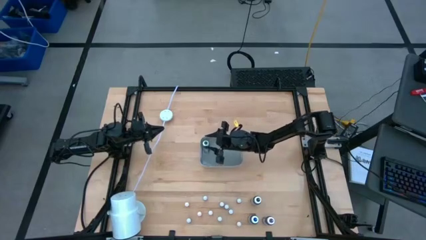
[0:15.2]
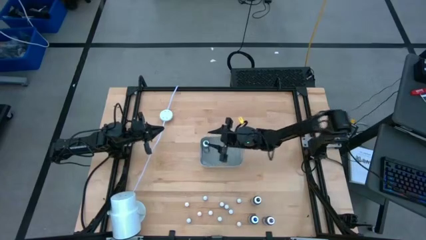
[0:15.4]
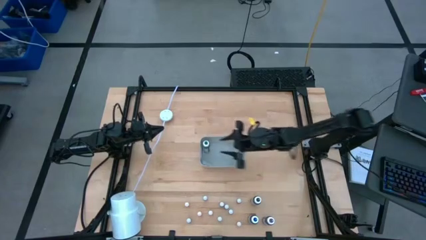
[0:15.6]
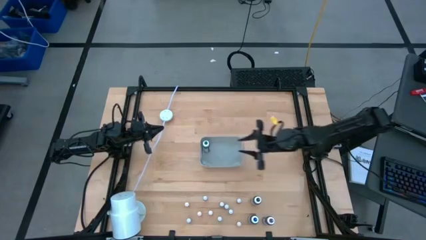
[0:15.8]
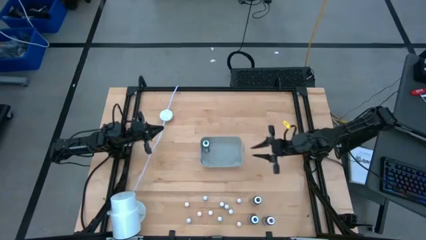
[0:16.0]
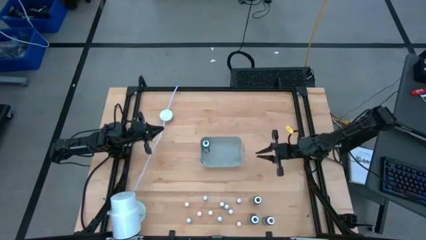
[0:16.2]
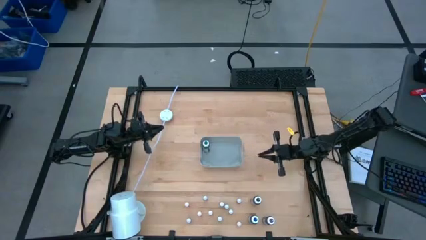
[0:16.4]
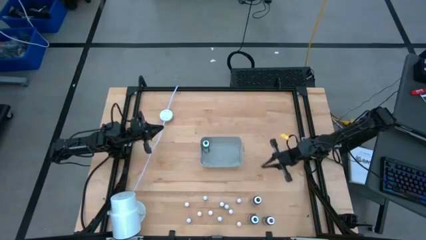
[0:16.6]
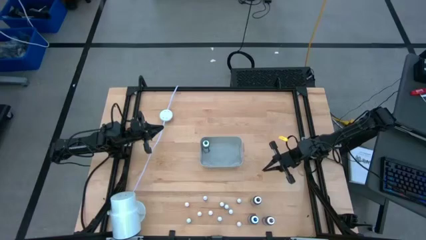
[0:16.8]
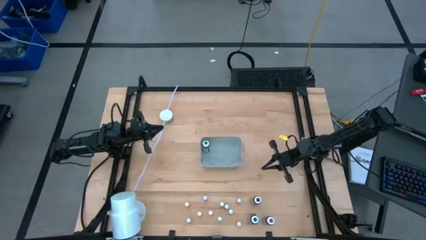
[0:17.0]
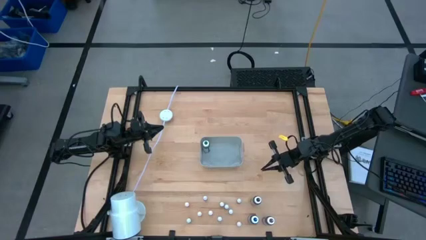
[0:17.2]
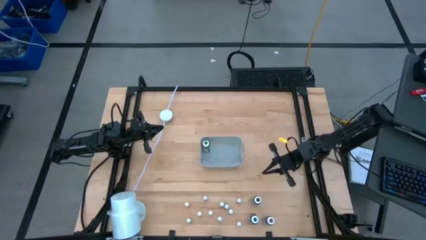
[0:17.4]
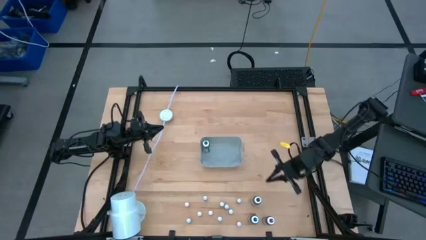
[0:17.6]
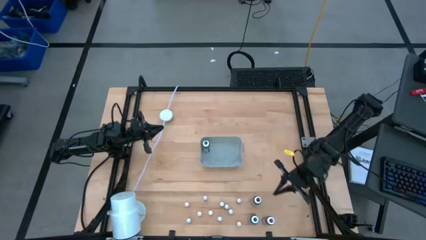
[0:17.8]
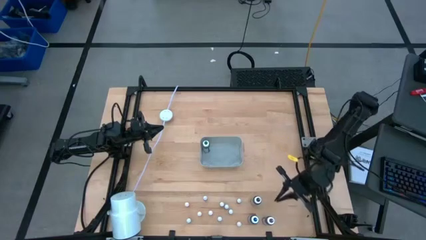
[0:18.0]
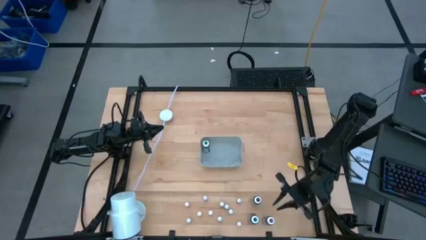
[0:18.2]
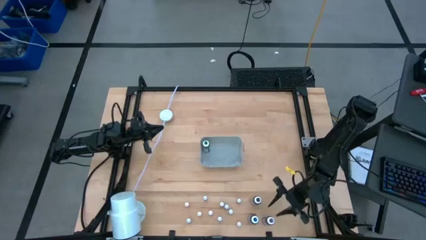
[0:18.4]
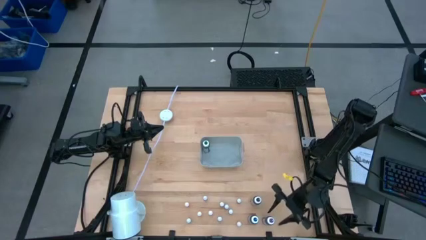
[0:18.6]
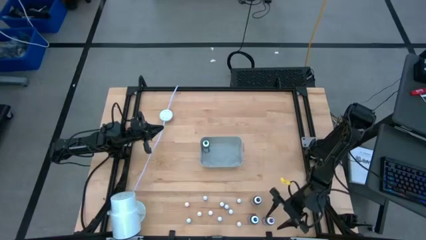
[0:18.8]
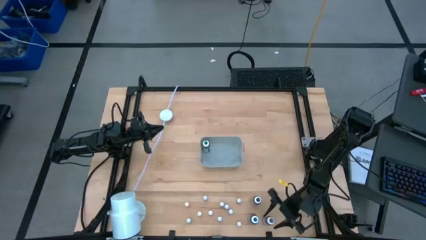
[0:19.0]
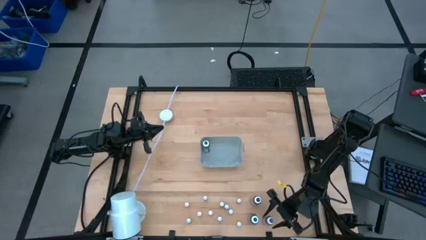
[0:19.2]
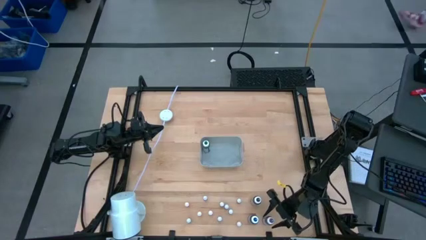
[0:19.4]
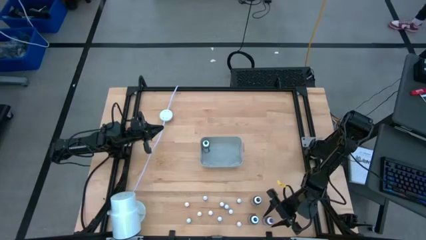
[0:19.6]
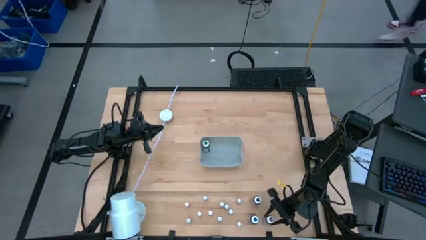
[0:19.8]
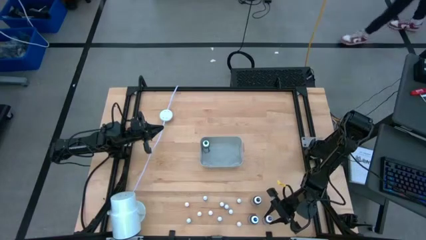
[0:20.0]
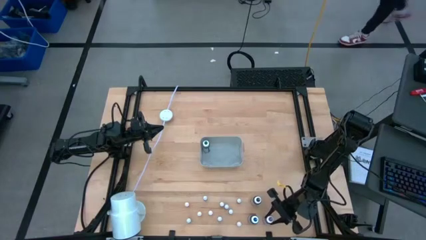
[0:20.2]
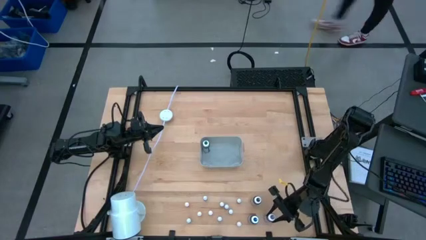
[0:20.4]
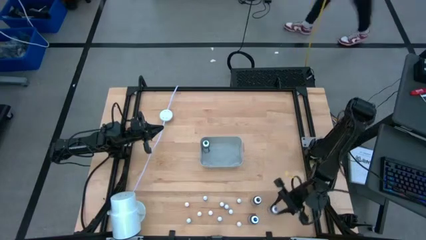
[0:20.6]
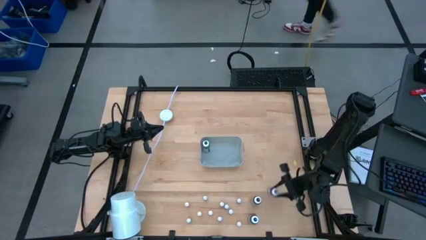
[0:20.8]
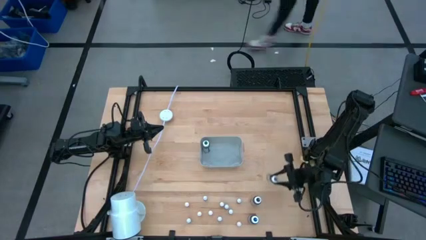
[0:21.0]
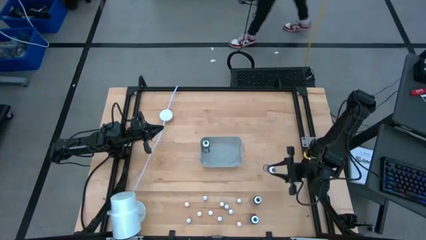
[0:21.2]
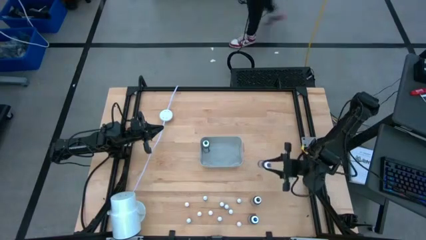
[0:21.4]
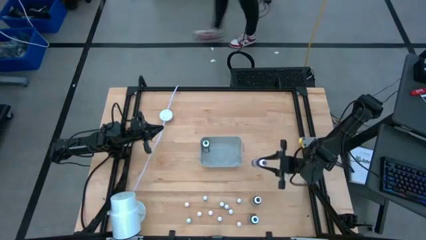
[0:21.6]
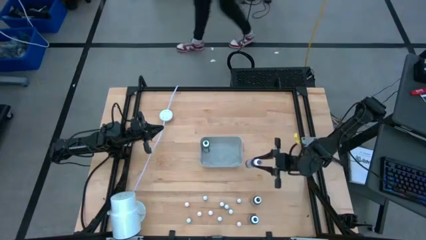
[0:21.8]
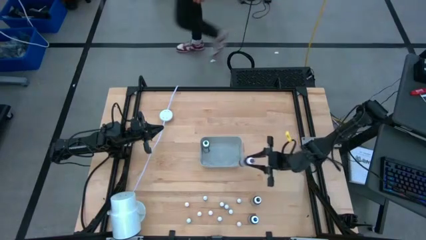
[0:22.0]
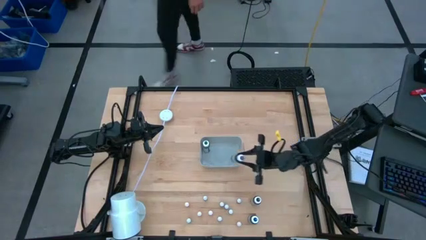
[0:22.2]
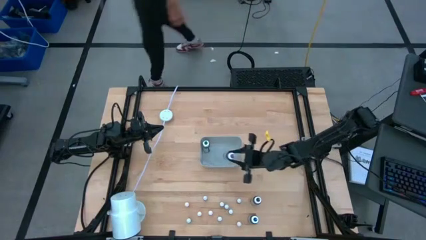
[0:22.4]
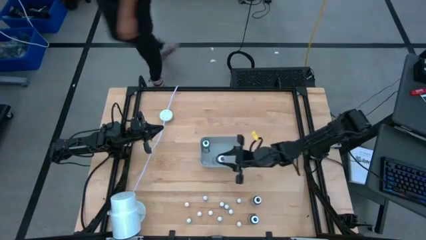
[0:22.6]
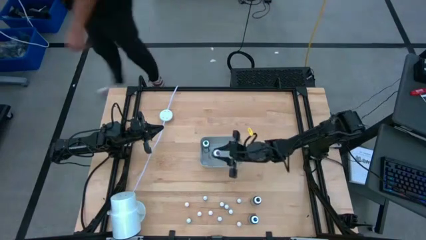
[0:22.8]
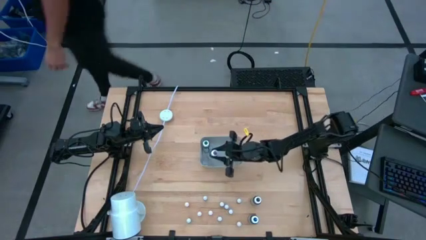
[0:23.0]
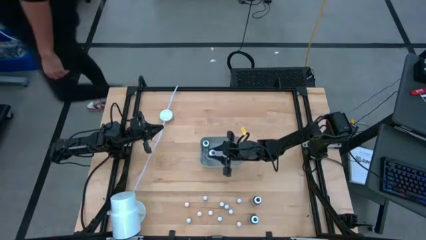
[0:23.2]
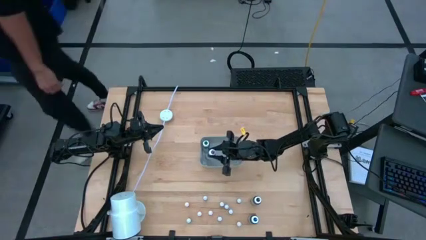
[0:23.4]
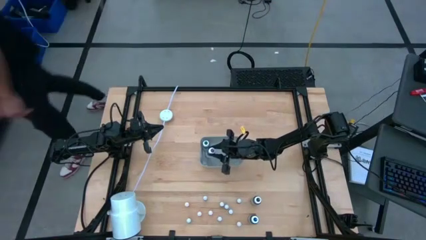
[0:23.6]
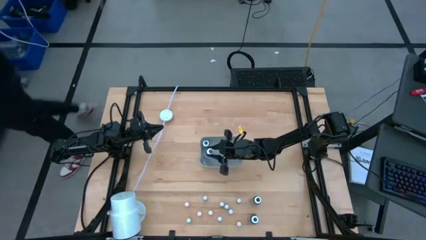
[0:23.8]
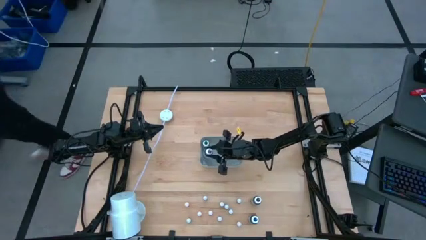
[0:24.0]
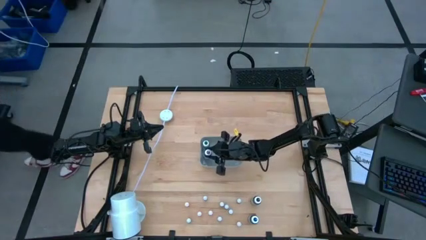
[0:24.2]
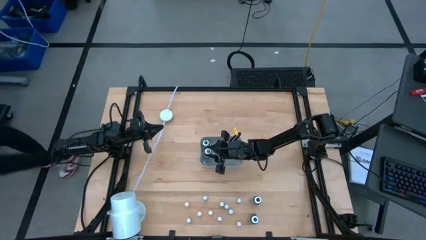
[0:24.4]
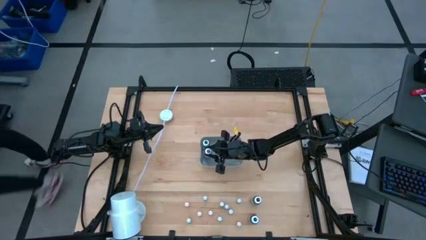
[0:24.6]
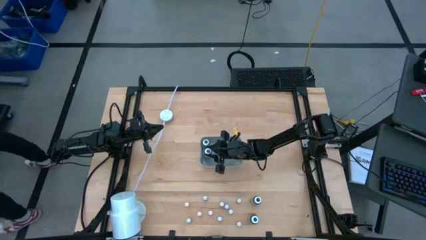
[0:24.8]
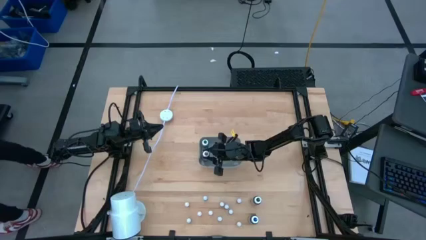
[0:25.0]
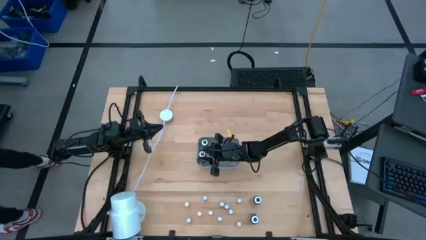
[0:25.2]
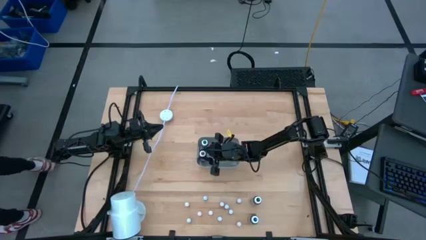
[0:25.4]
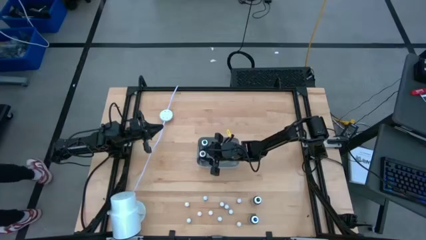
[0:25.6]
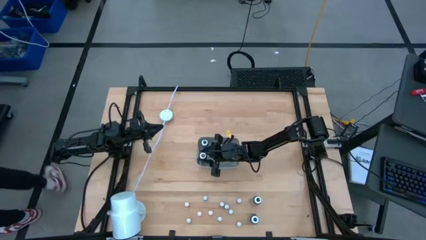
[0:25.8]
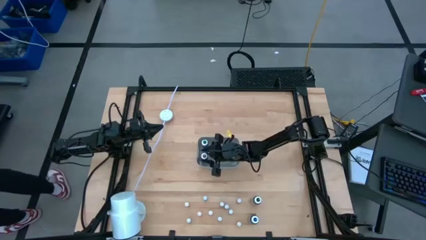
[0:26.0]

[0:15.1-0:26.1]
Task: Pick & Place food coloring
Put the large purple food coloring bottle into the gray container

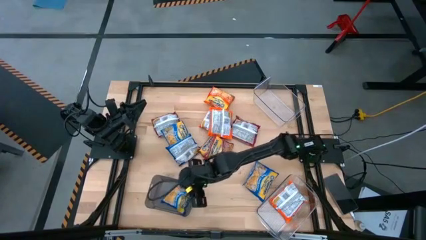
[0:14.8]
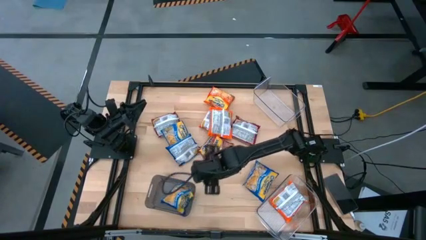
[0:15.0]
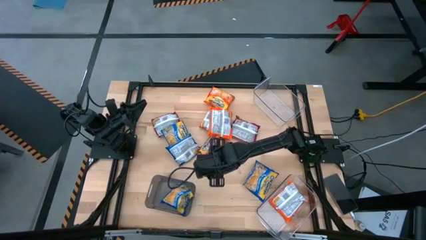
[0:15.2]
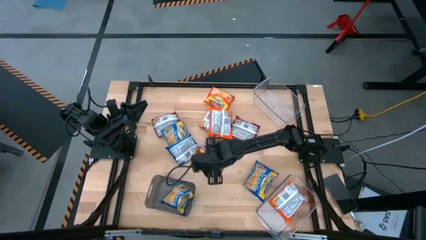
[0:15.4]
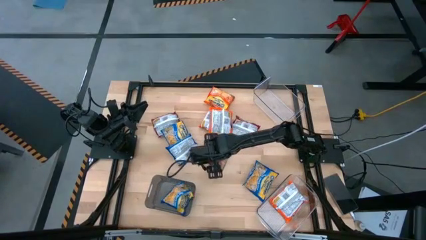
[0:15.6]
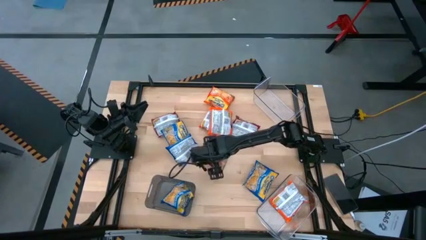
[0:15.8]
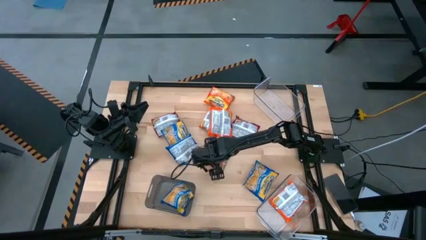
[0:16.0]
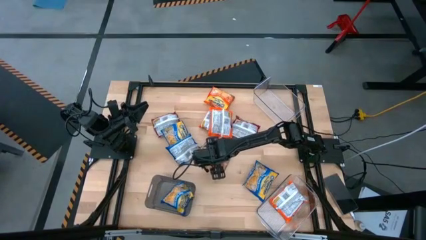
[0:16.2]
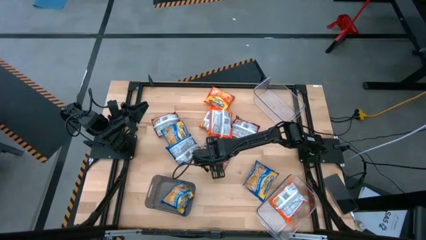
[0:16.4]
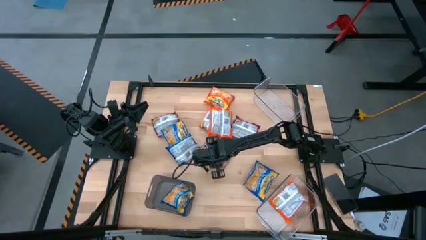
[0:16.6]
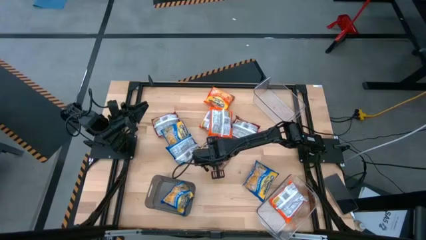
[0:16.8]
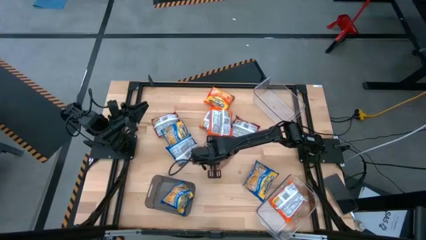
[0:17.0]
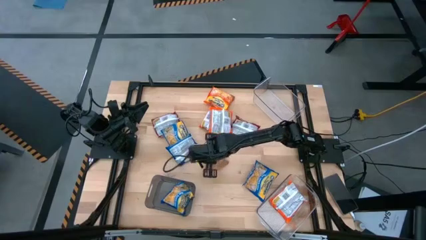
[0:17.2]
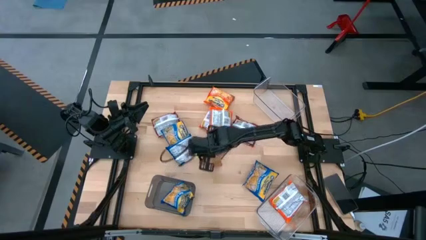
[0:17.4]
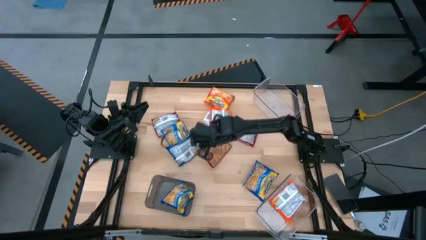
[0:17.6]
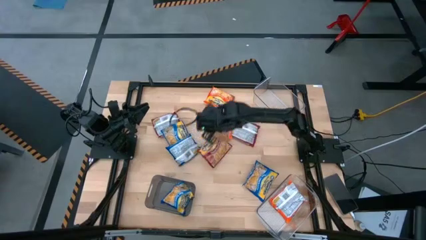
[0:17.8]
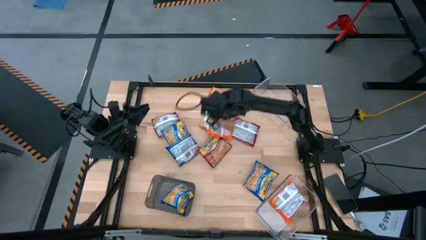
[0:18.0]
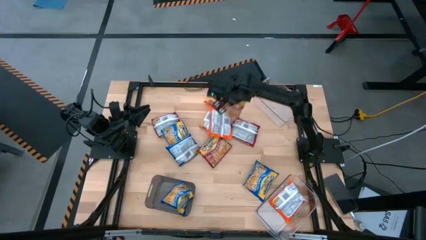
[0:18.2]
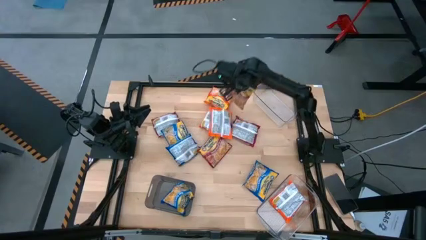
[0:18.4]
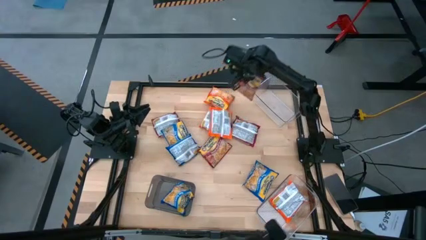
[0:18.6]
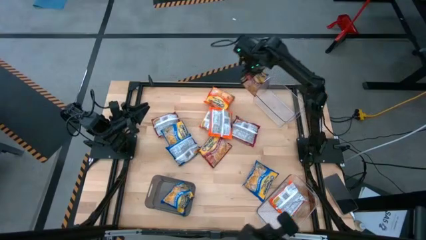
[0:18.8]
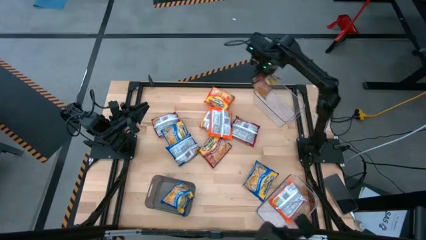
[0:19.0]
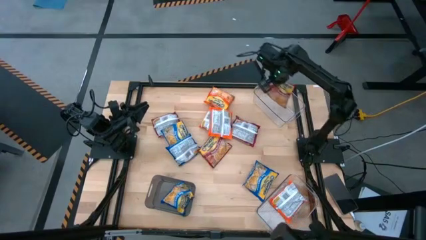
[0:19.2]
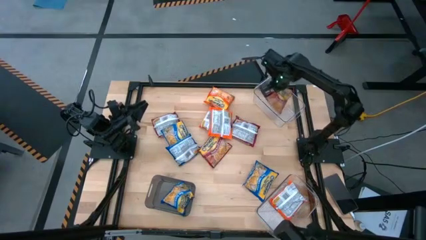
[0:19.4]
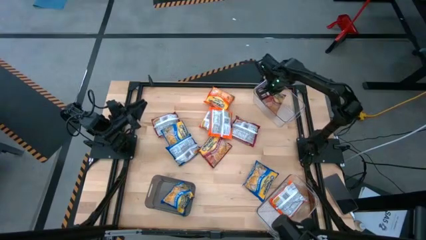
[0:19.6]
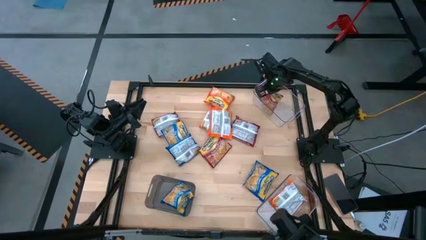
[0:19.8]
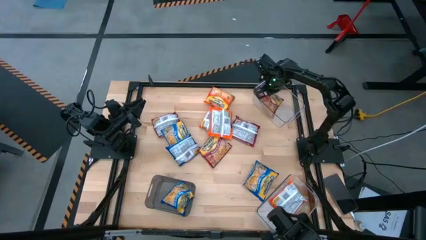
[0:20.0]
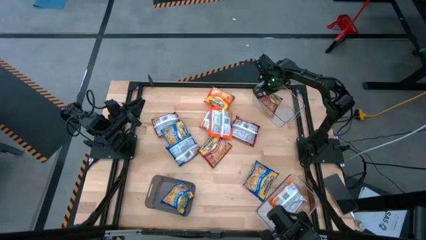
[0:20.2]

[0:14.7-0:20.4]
Task: Sort Maruchan noodles
Put the red noodle pack into the top transparent bin

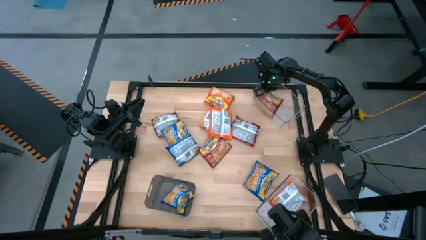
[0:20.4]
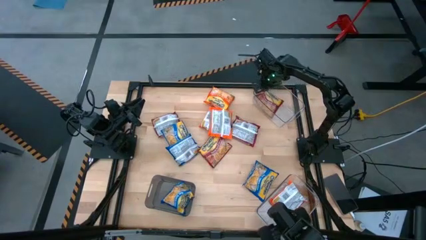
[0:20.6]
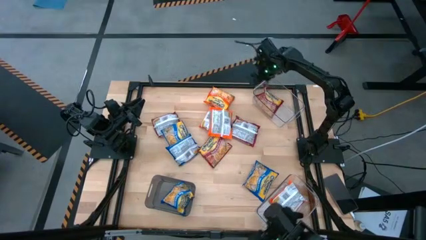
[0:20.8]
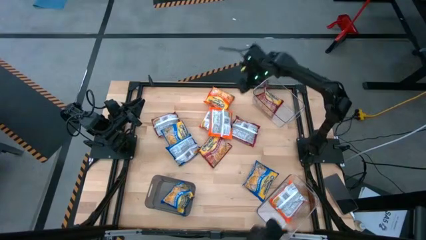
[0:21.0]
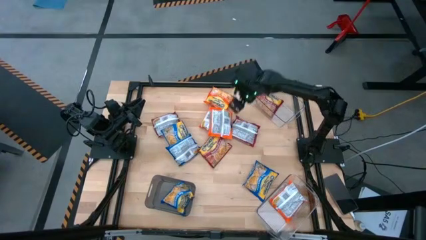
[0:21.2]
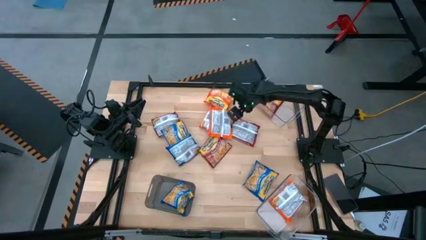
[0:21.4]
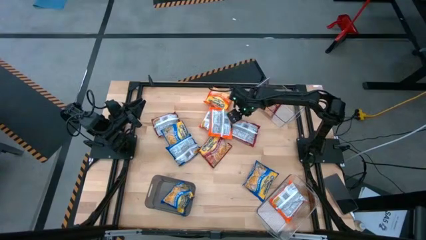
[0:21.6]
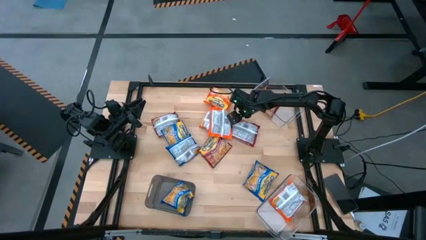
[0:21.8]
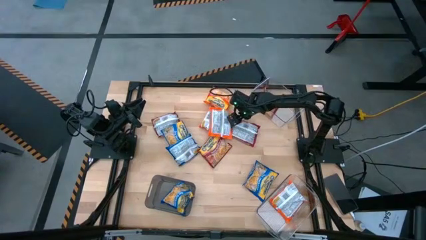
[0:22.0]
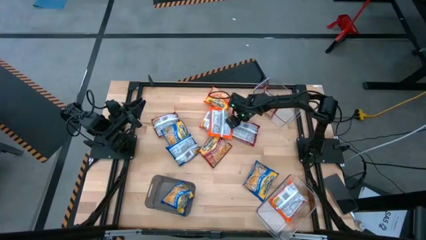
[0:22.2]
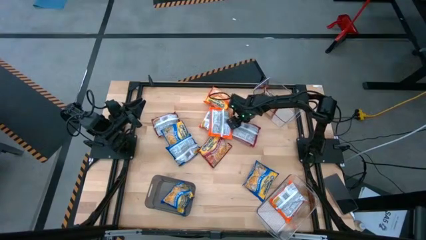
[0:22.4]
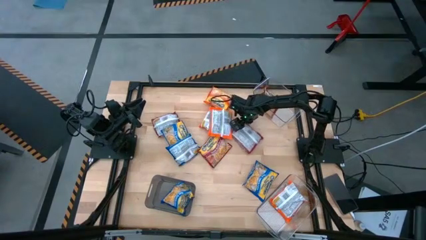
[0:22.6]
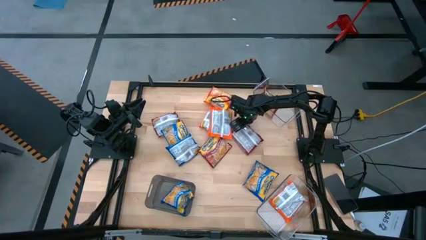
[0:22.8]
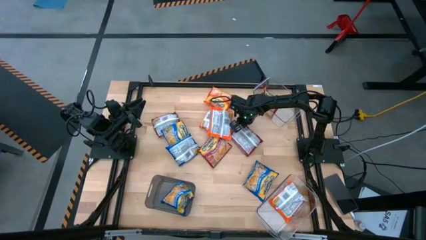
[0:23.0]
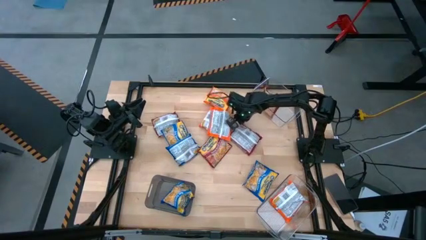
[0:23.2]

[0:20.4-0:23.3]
Put the red noodle pack into the top transparent bin
